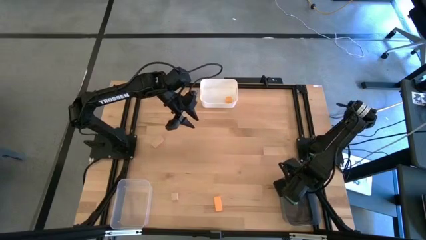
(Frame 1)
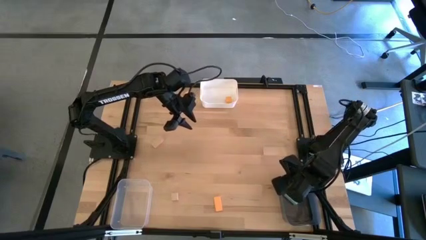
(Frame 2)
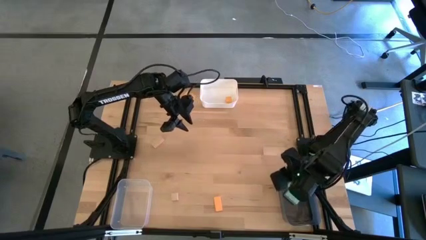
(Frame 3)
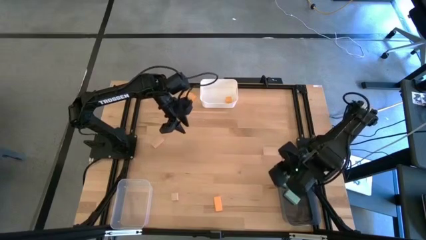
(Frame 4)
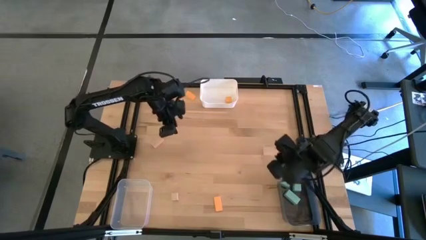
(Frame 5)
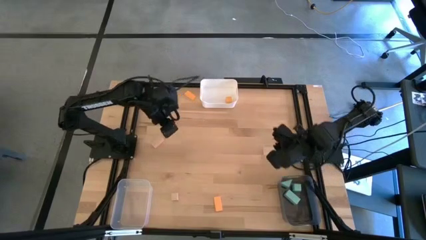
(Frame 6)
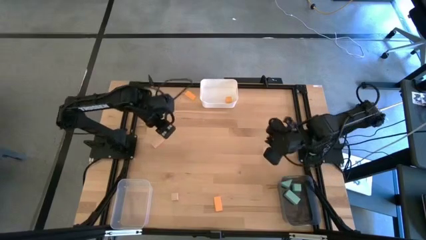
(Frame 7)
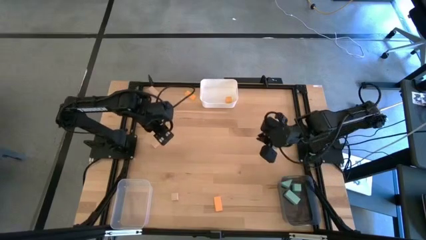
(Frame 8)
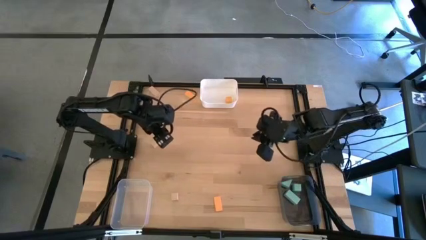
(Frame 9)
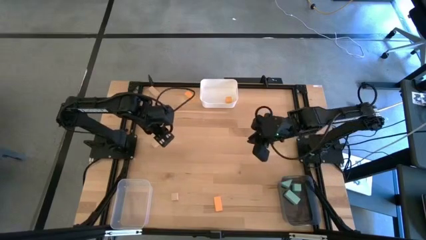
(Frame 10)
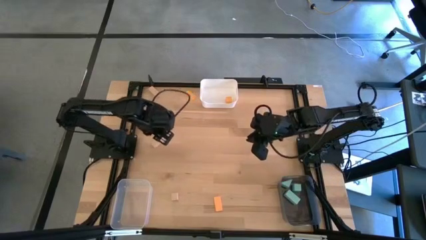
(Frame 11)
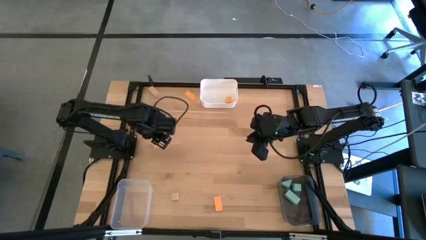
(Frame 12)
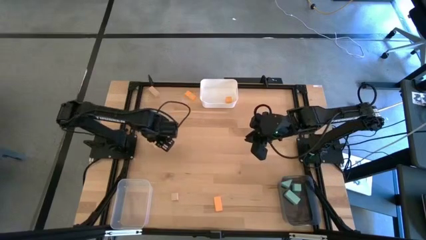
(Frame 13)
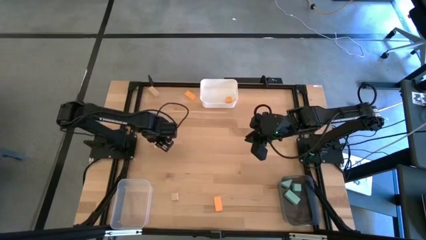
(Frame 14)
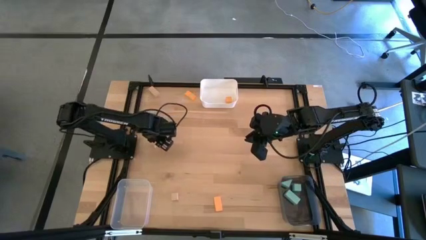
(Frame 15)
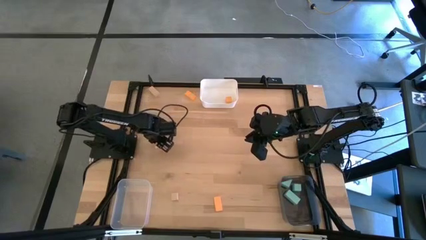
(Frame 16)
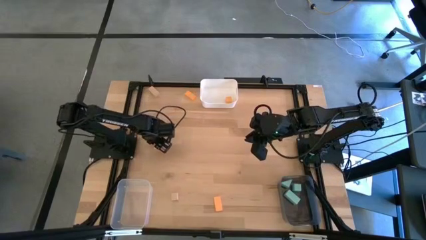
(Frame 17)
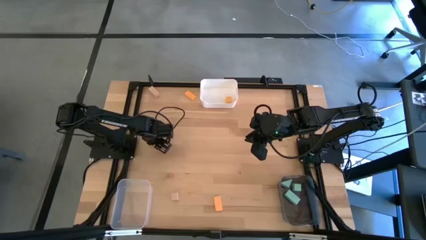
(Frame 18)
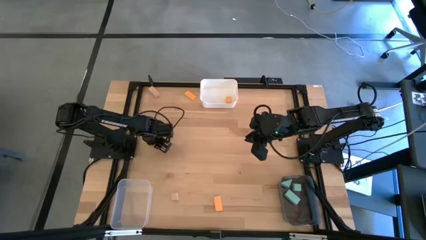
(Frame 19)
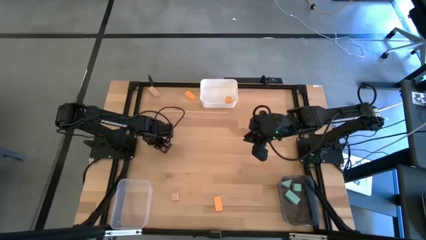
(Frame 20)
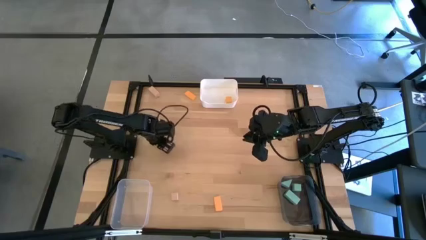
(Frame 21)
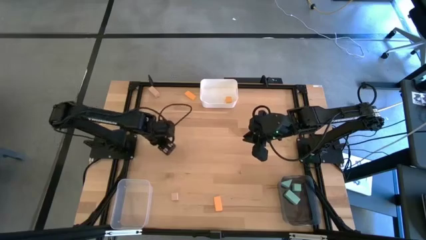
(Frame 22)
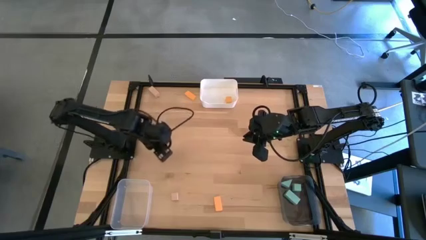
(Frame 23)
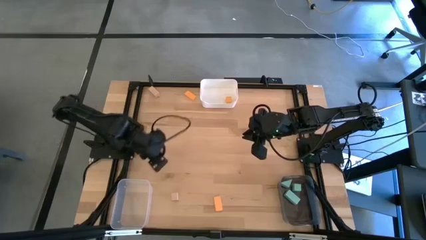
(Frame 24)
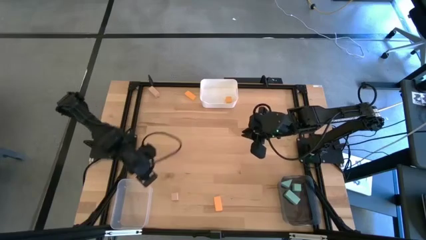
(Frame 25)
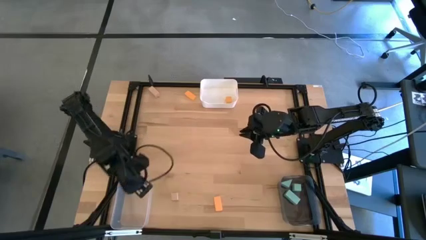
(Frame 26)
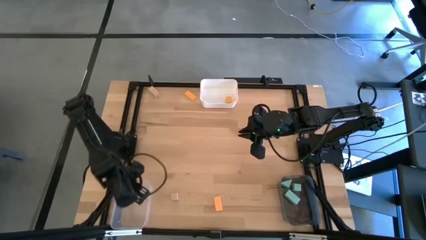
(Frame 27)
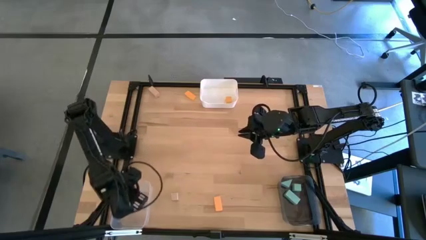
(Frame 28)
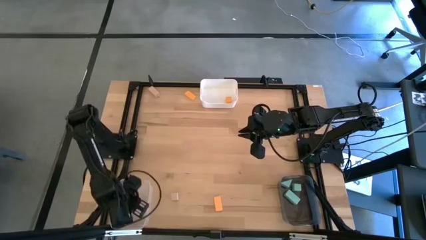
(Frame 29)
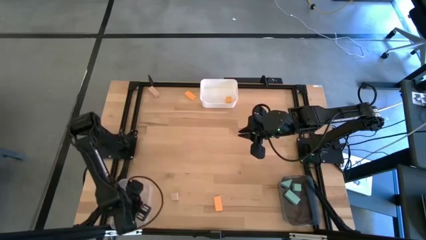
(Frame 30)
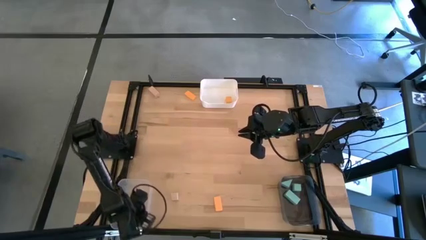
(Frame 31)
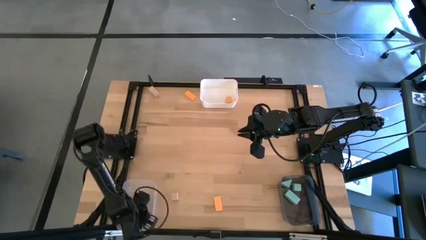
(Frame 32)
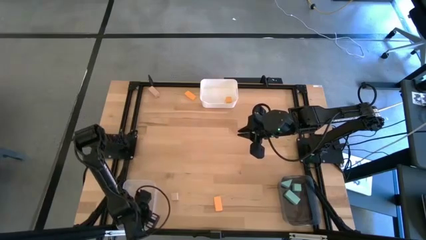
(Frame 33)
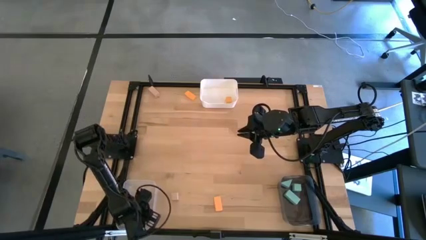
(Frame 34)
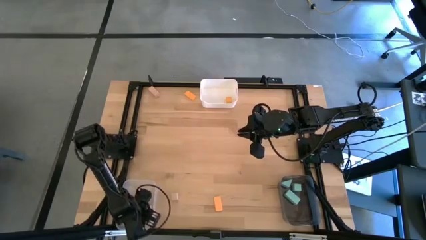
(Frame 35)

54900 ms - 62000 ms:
Task: Sort & place blocks by color
Put the middle left white block into the transparent bin

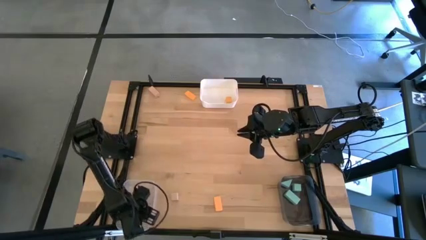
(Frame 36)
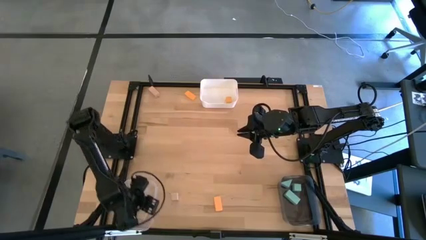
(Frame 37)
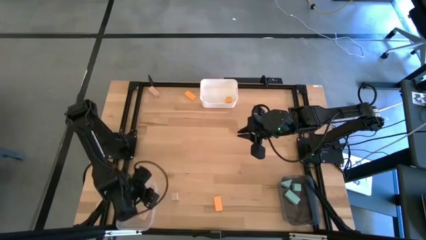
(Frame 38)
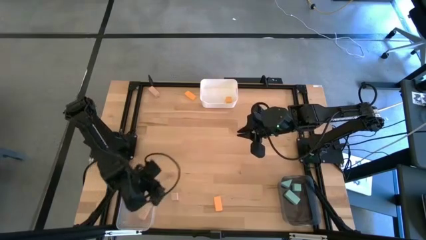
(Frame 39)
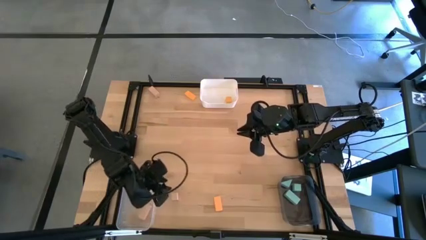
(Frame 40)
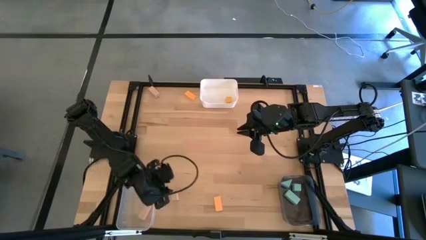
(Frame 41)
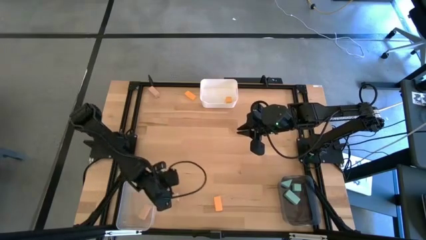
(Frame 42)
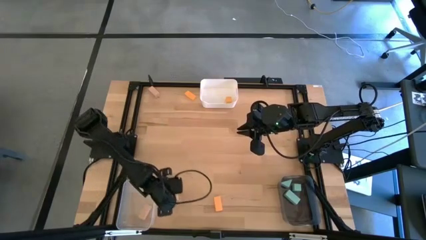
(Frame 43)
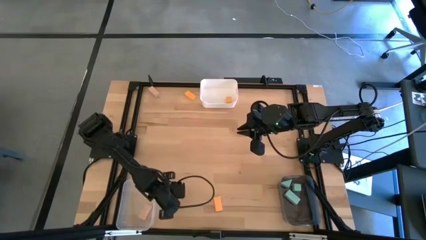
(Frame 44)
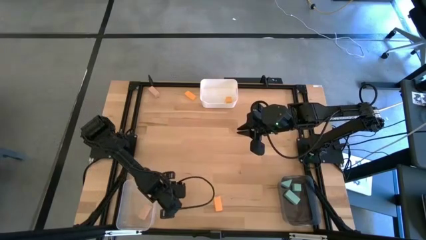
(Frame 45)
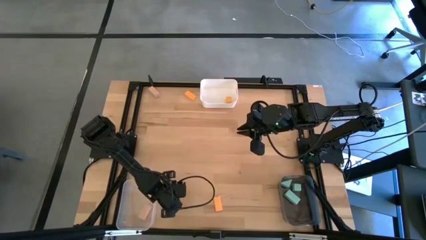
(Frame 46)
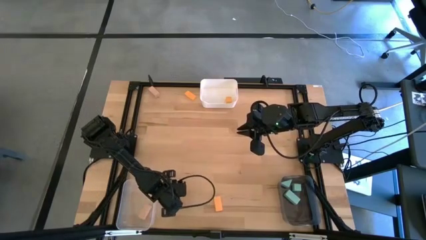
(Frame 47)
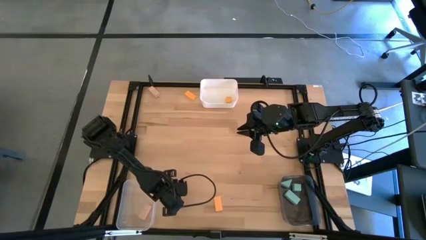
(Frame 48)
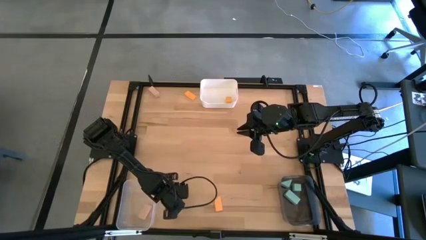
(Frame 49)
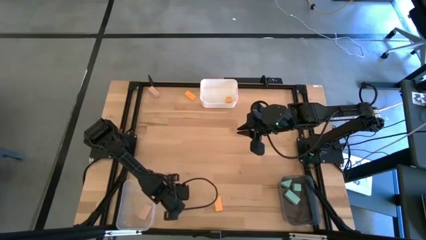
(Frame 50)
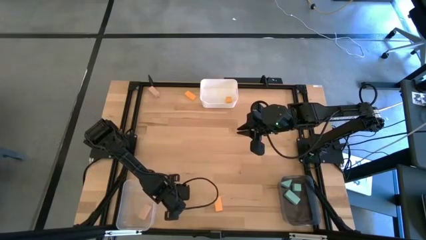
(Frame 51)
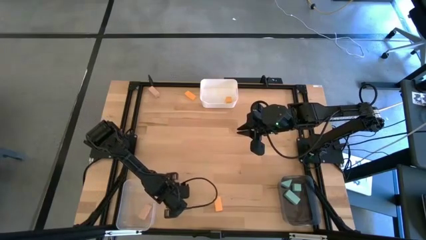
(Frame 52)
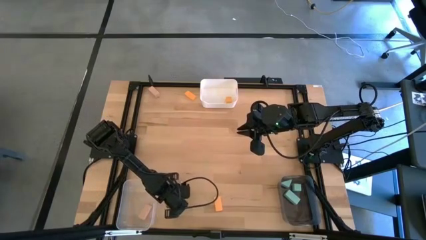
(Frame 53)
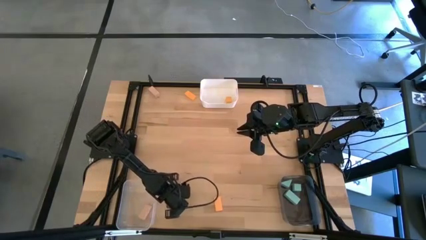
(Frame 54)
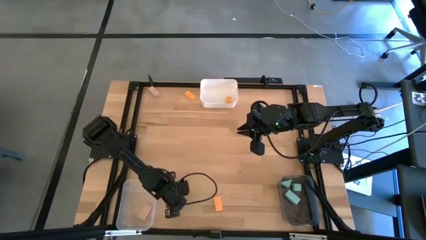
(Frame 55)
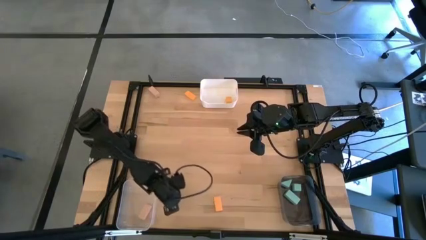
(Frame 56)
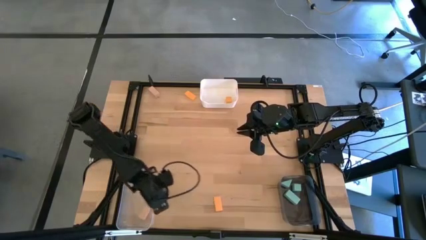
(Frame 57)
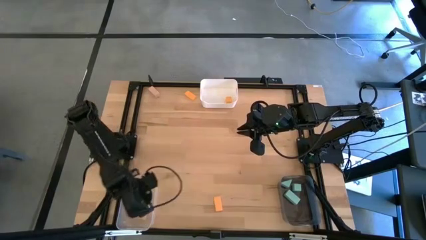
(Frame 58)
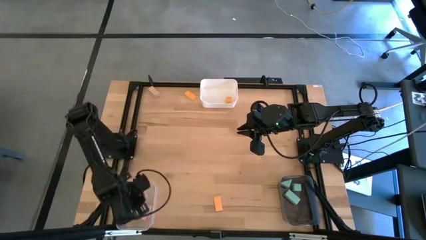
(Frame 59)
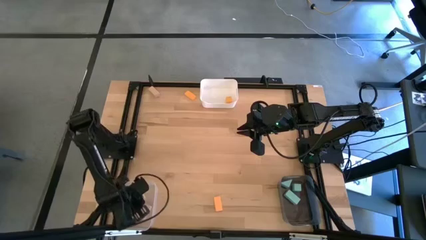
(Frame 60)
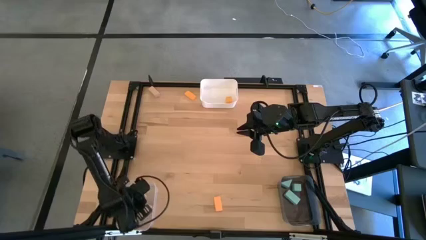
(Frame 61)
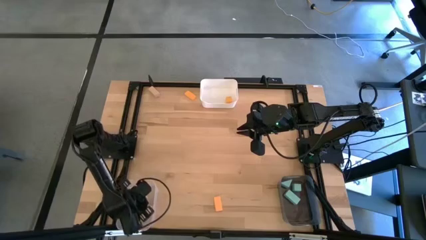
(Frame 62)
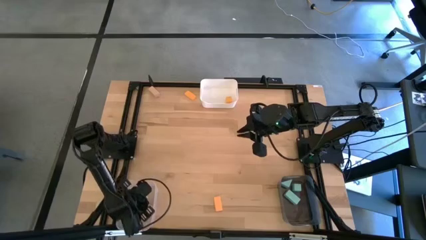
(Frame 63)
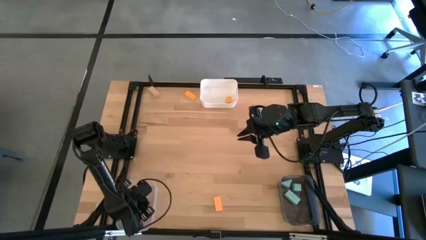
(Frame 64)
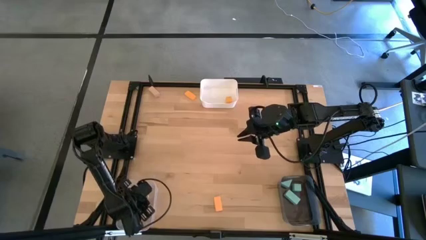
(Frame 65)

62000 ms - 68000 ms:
Put the bottom white block into the transparent bin

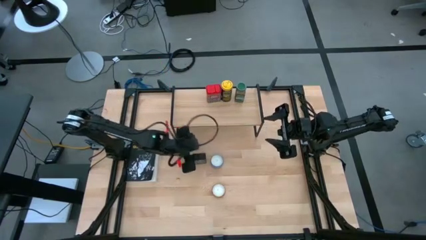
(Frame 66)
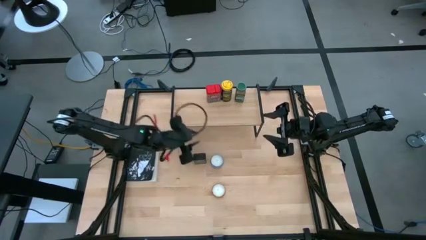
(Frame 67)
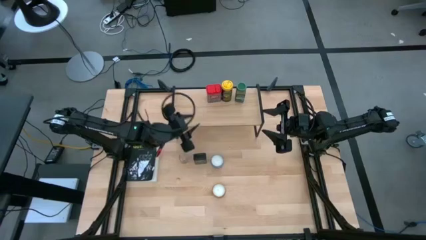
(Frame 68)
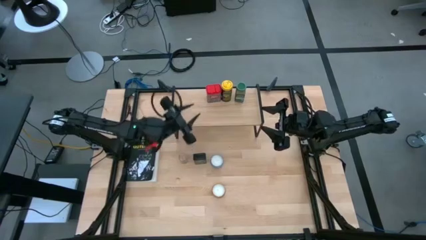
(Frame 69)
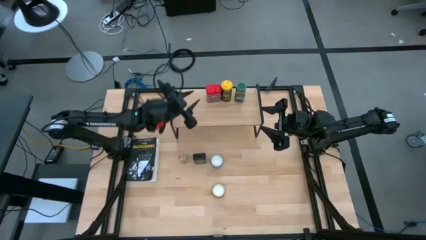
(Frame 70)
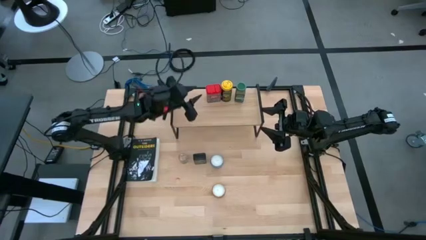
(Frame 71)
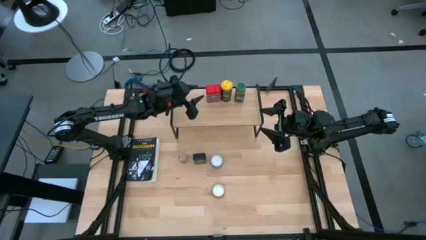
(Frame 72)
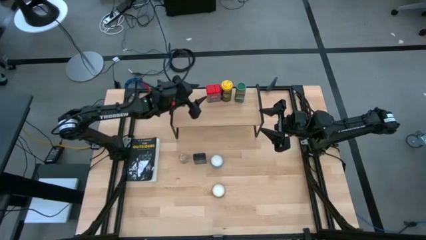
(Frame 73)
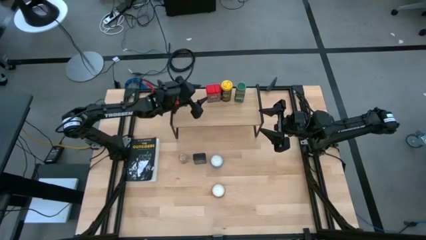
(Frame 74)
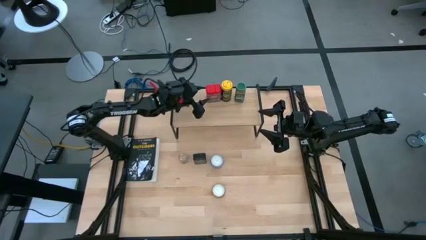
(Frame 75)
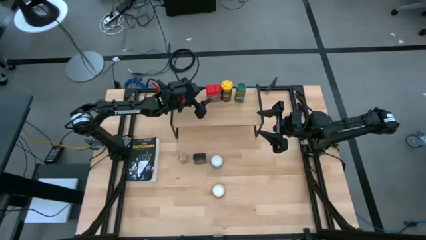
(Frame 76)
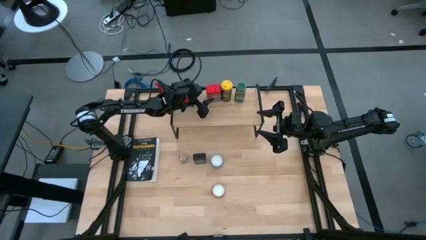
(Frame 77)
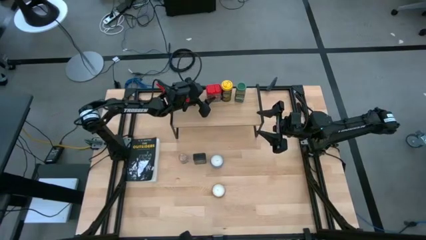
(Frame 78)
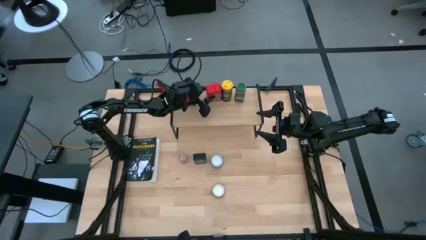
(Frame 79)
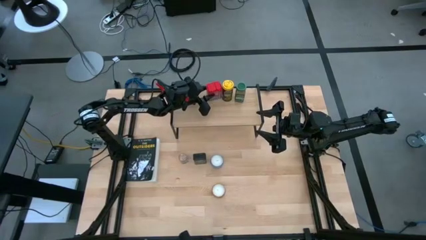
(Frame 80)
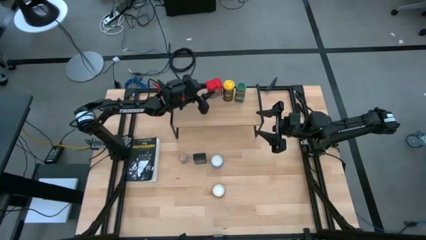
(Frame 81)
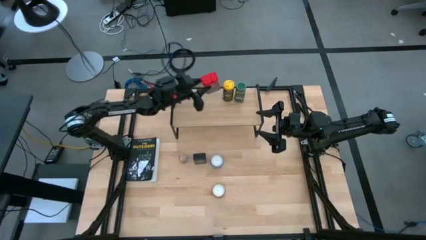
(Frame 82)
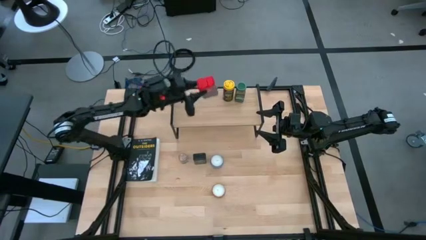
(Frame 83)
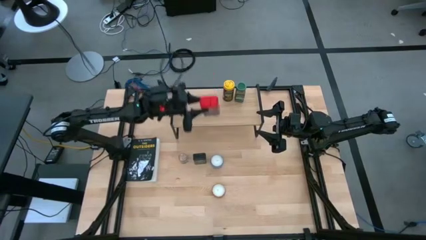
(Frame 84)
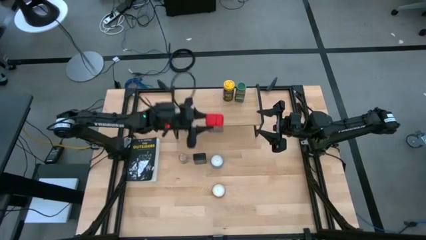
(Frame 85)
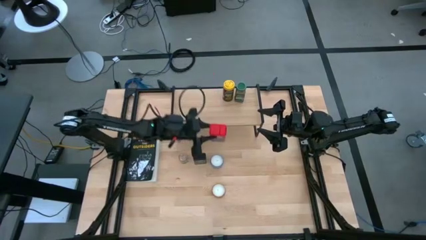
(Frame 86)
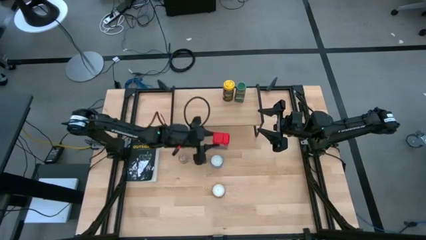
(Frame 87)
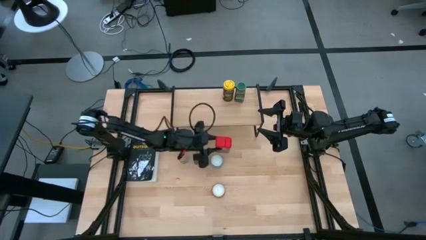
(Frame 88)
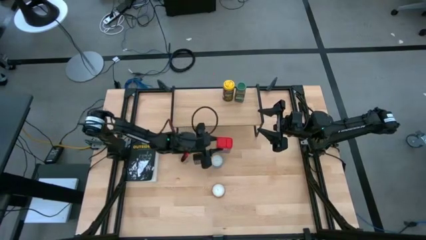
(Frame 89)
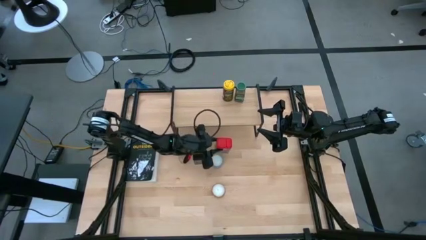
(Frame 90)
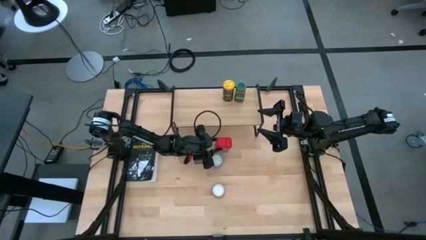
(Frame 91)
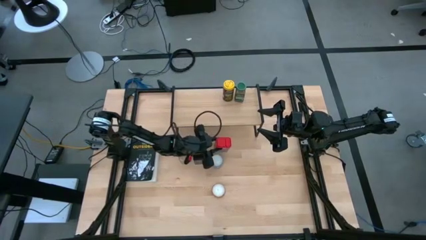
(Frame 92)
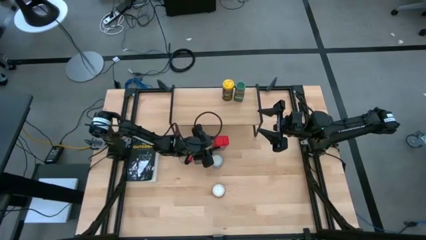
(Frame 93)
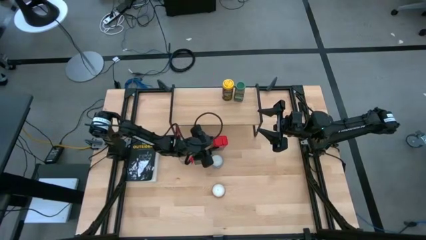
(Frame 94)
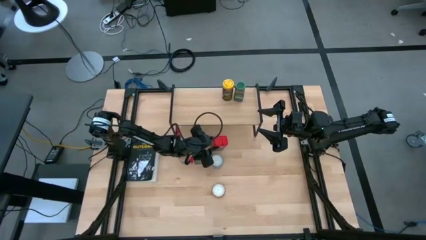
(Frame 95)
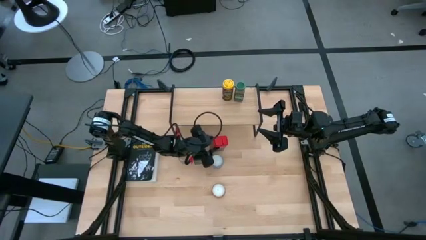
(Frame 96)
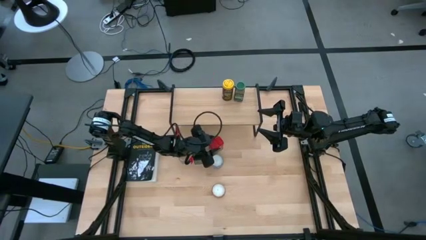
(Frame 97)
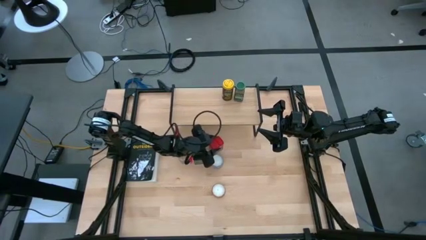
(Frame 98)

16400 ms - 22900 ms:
Task: Shelf spices
Remove the red seasoning can from the shelf
